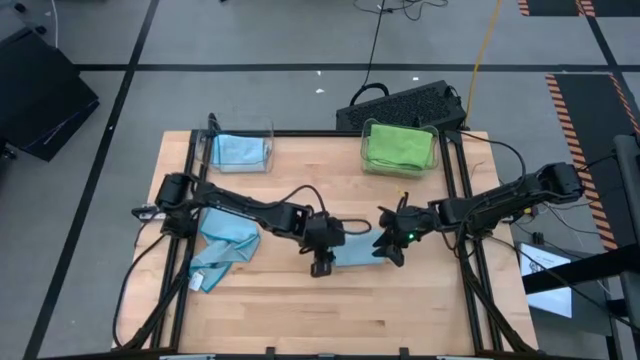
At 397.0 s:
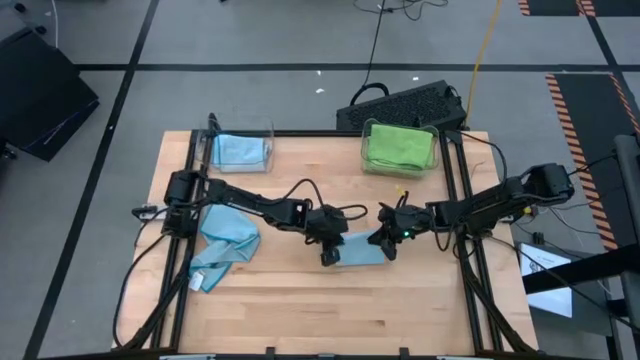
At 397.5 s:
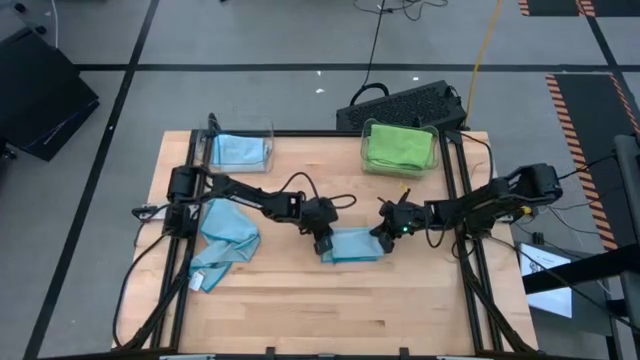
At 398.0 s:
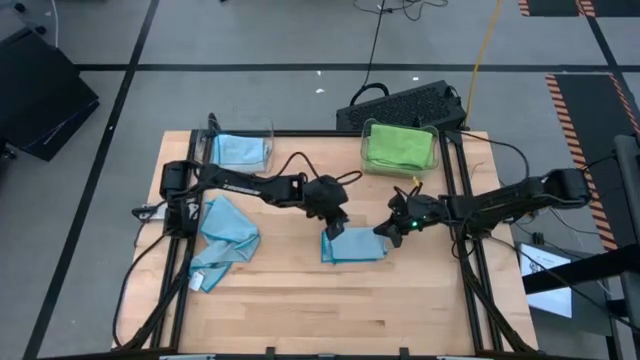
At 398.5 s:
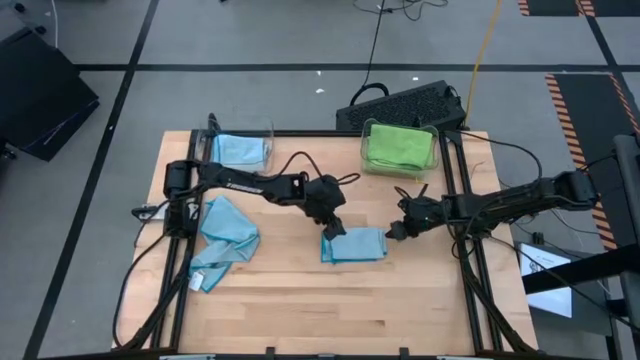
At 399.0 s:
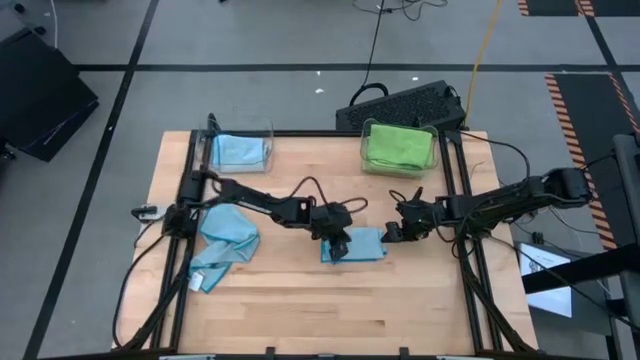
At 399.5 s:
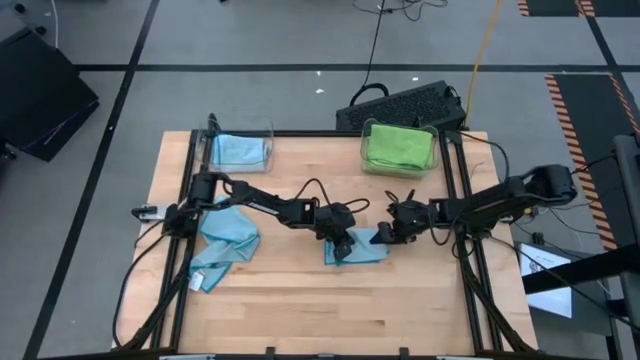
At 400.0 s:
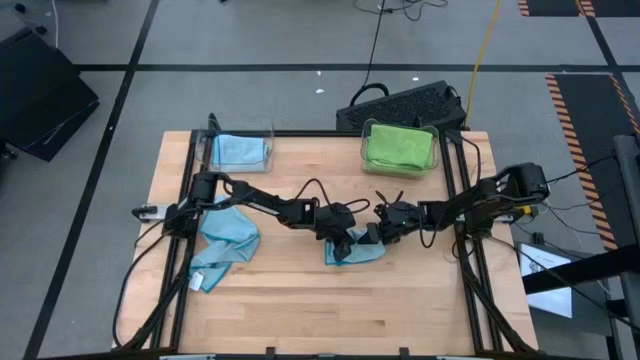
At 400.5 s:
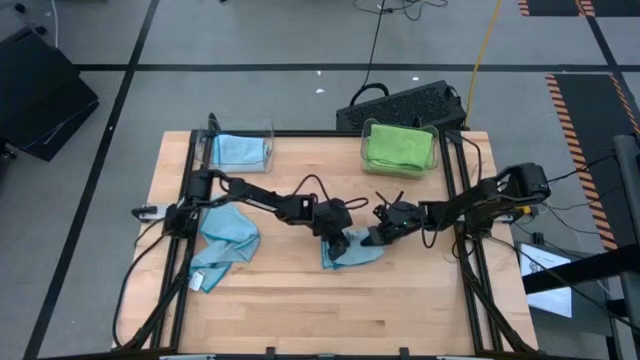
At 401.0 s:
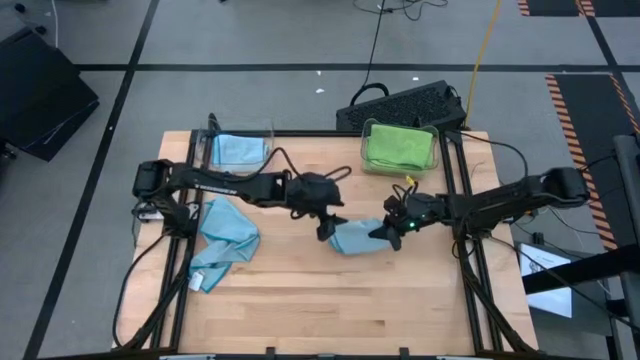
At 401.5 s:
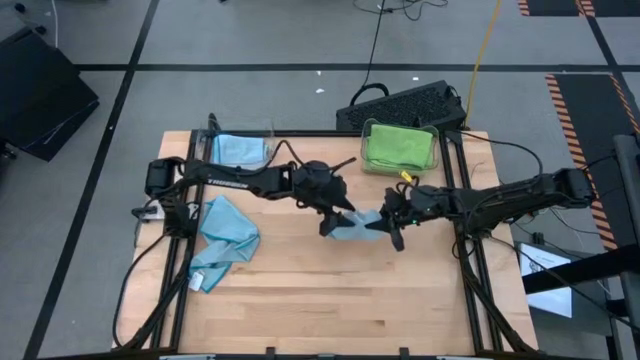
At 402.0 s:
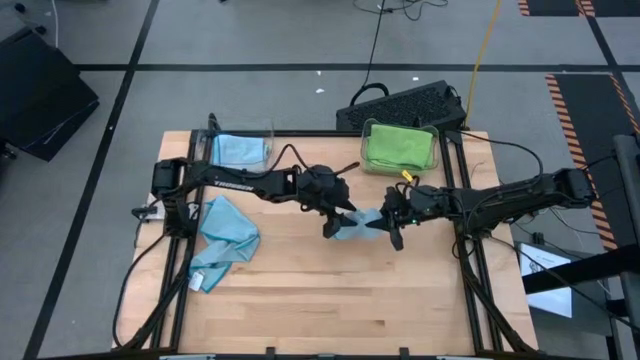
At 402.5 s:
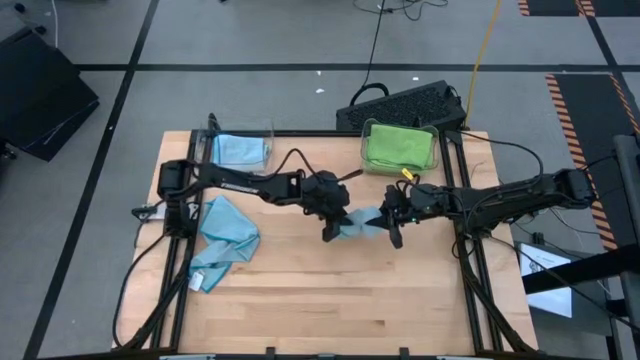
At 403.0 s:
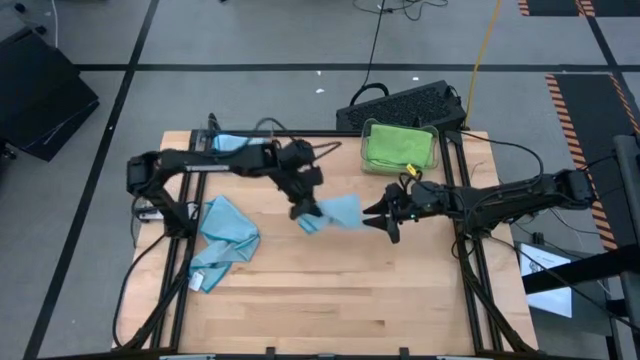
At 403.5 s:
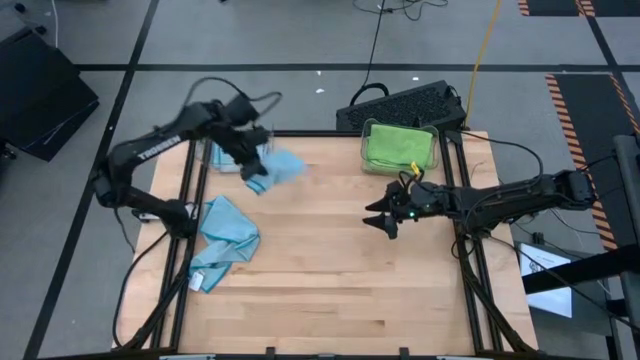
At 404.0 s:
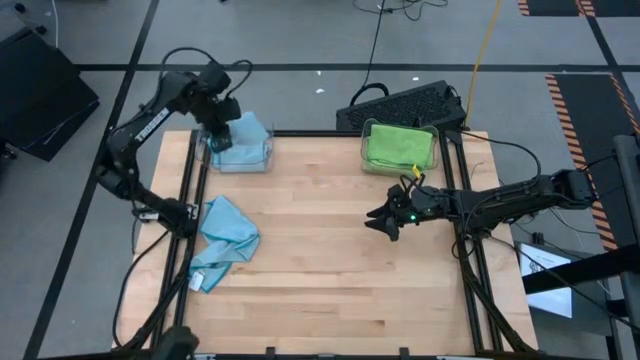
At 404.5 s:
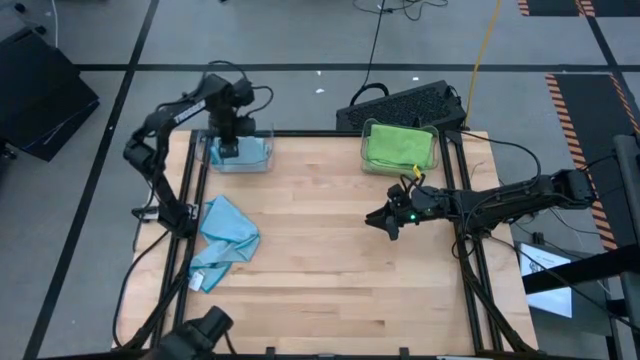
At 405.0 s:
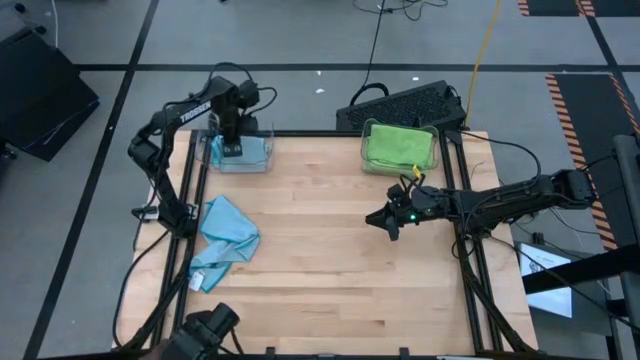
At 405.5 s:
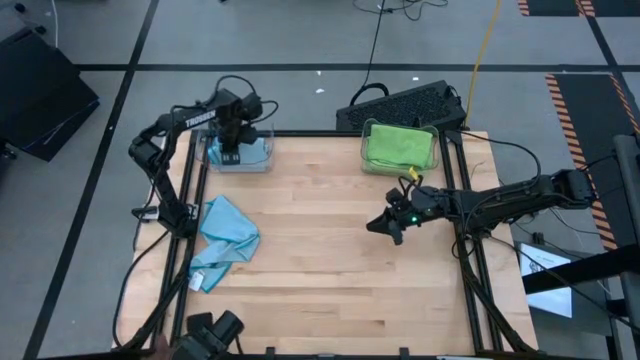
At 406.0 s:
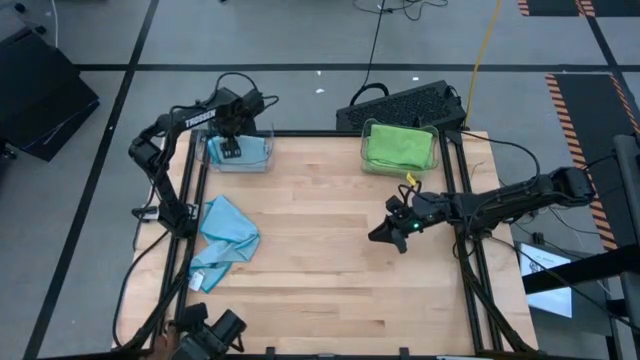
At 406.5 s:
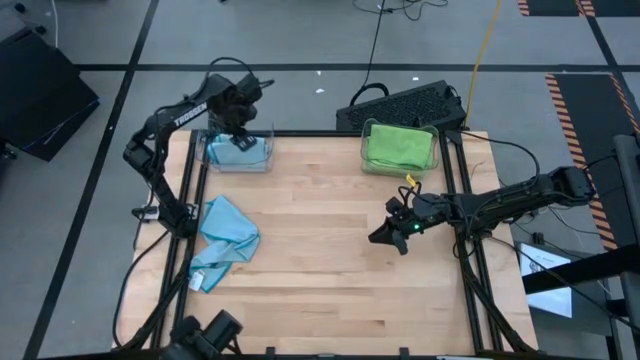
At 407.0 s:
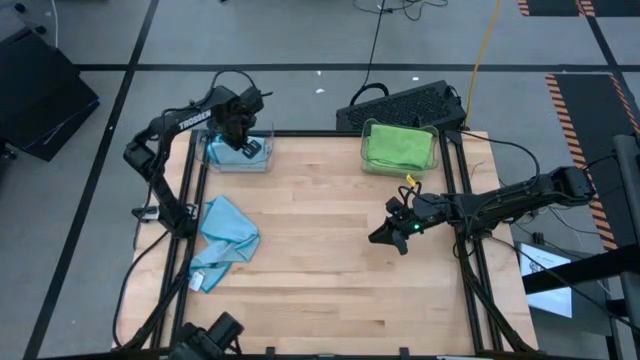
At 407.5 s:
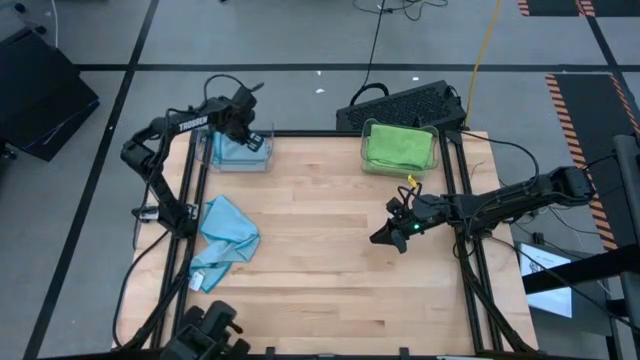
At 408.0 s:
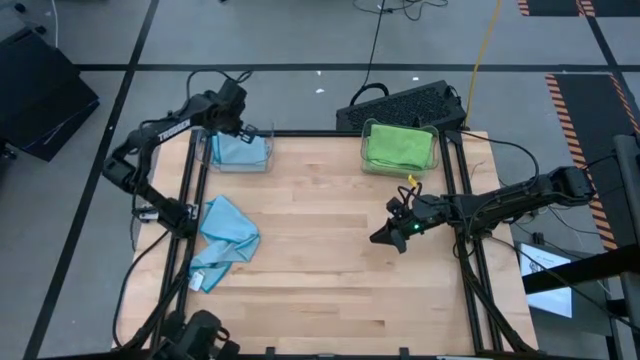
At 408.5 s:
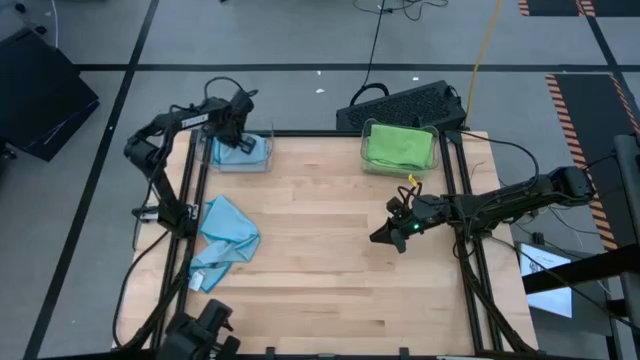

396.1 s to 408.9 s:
Task: Sort microfiber towel by color & place in baskets
Stack the right blue towel on top of the blue towel in the left transparent bin

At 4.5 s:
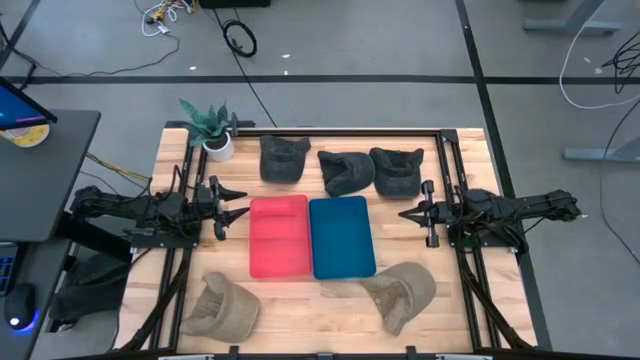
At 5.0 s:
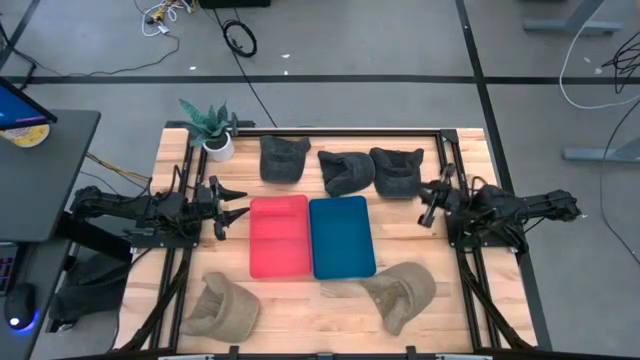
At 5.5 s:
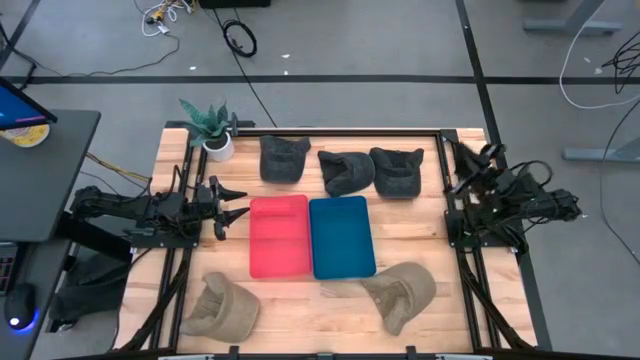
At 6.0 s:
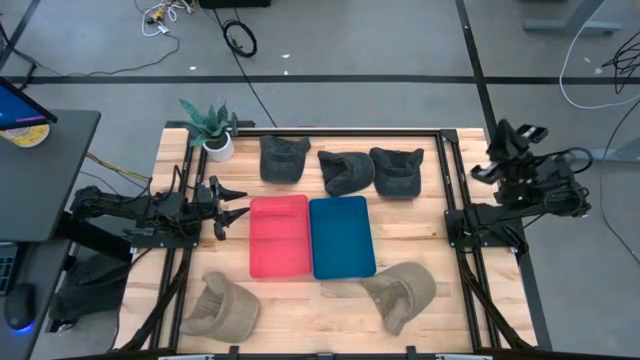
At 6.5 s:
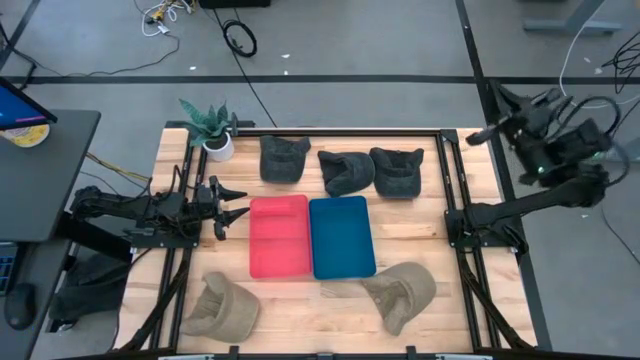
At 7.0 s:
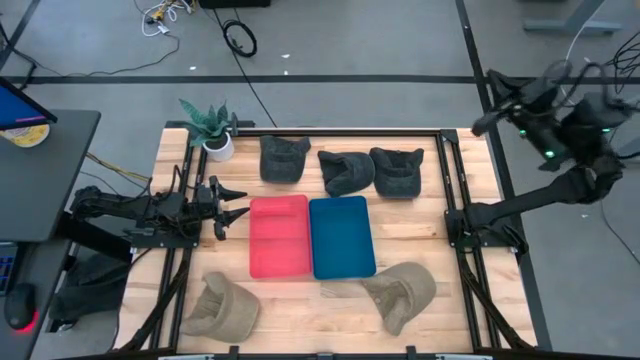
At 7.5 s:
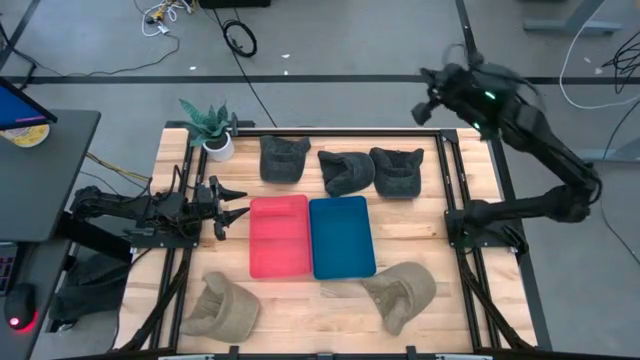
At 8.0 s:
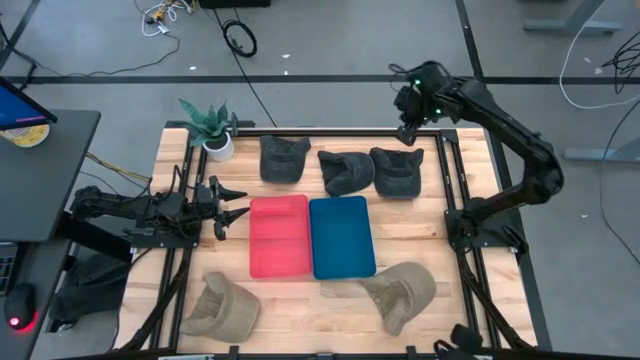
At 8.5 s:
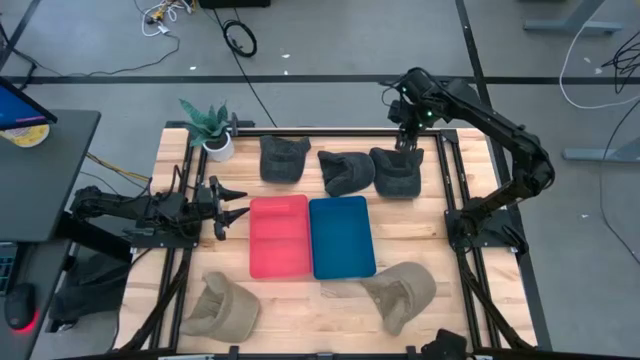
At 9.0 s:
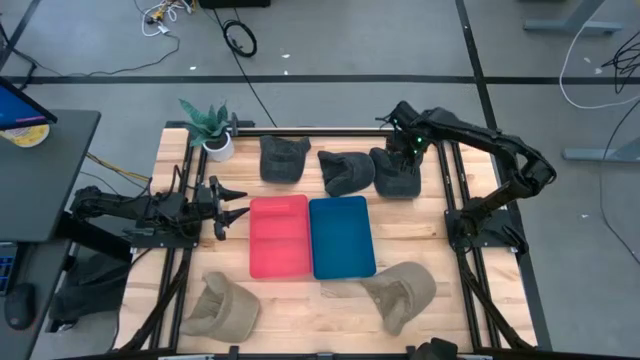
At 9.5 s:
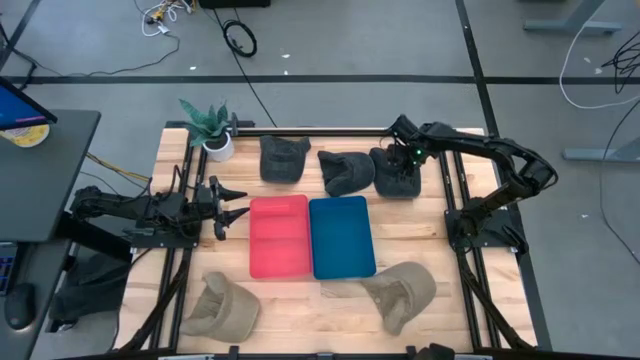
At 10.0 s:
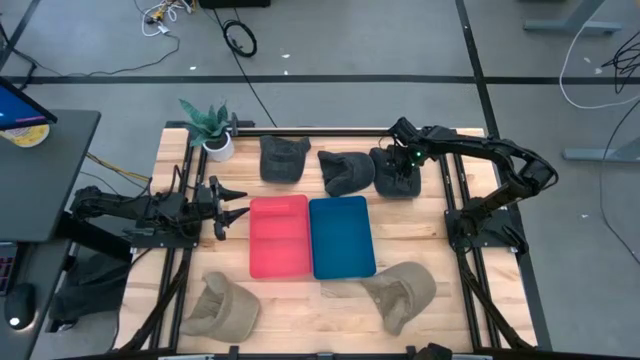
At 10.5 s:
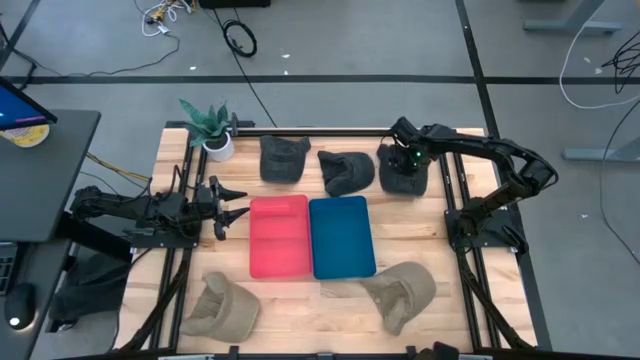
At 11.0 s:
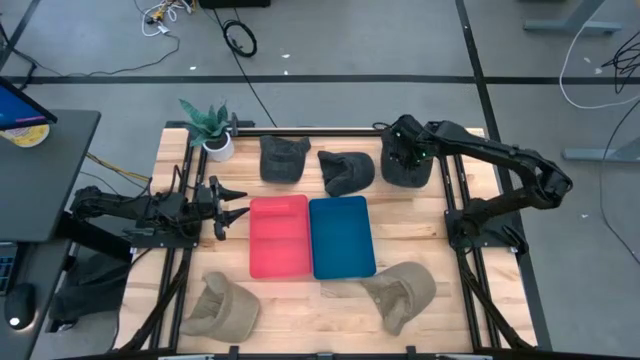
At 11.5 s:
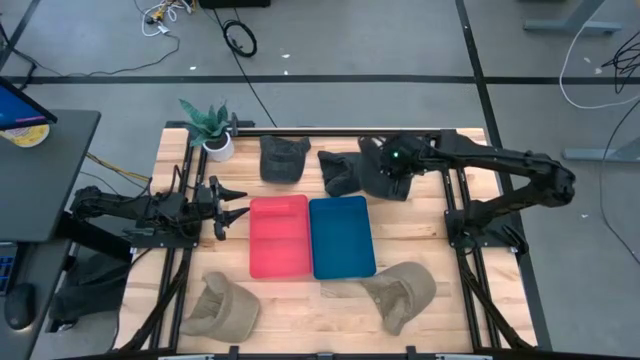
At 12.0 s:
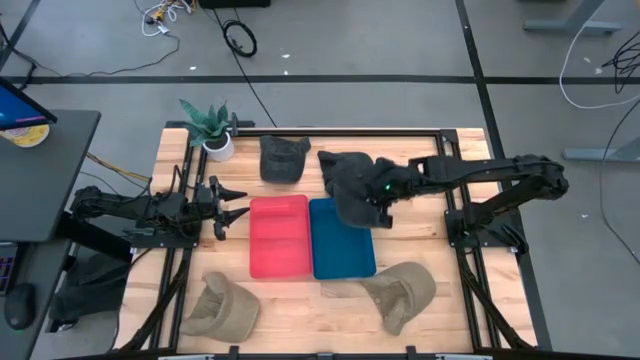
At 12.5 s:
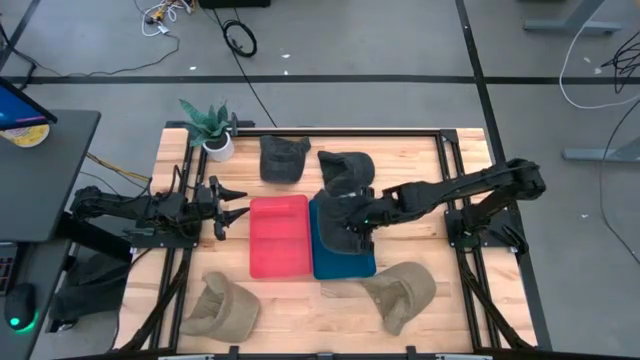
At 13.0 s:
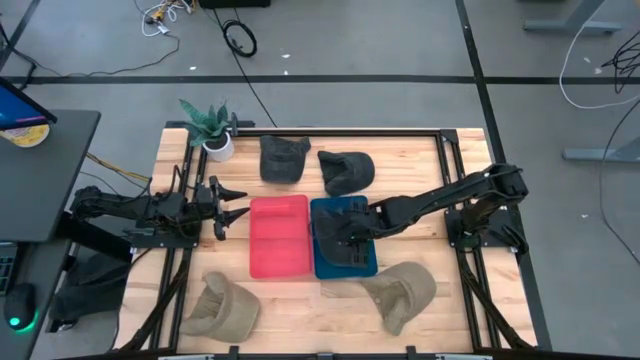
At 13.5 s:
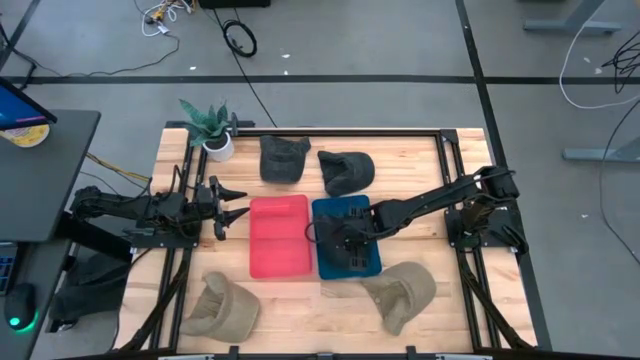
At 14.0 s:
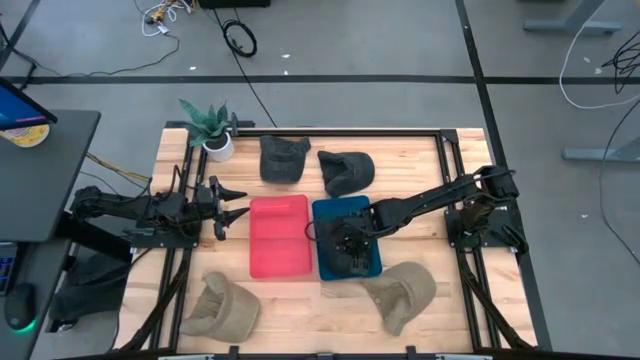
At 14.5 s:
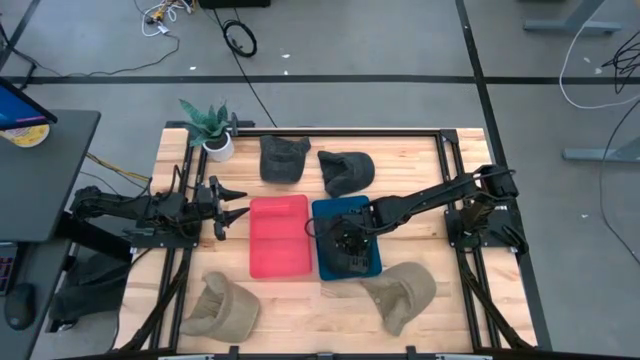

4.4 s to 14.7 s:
Task: Pick & Place hat
Put the black cap into the blue bin
